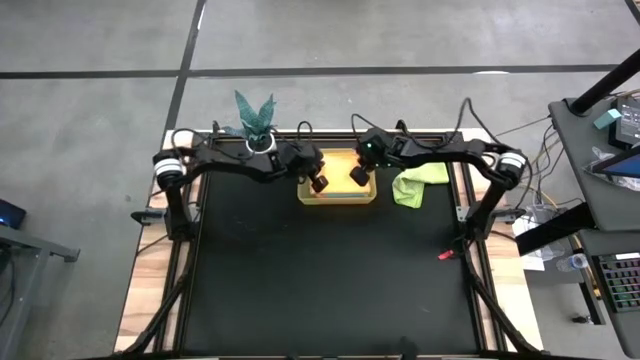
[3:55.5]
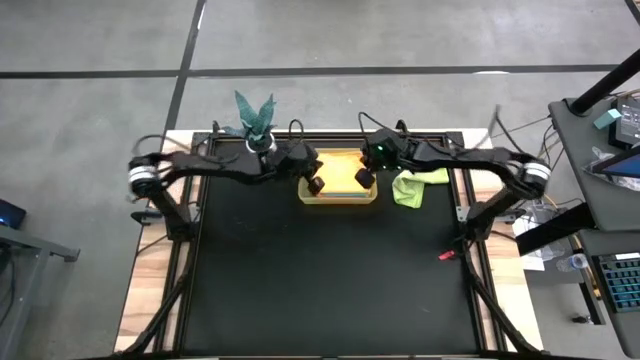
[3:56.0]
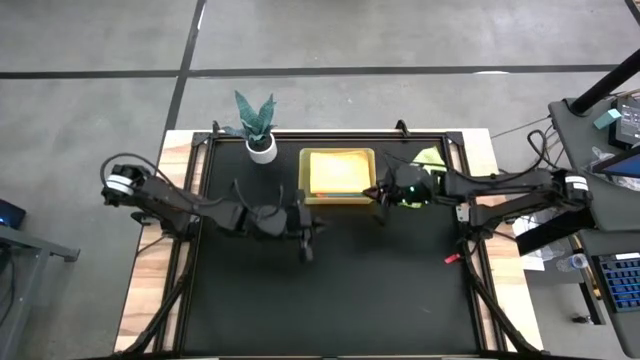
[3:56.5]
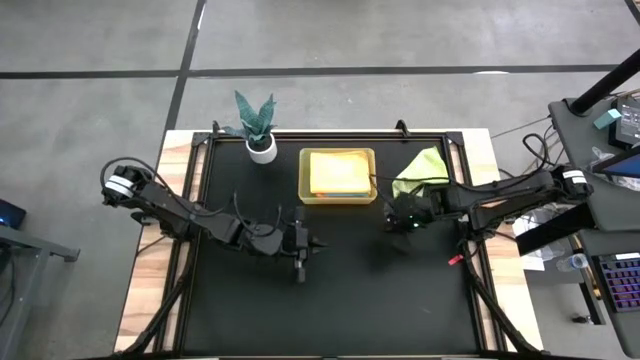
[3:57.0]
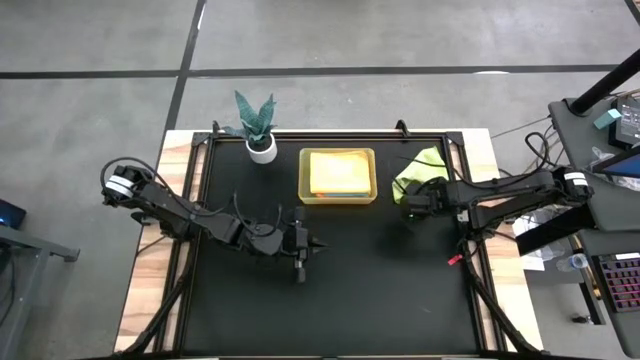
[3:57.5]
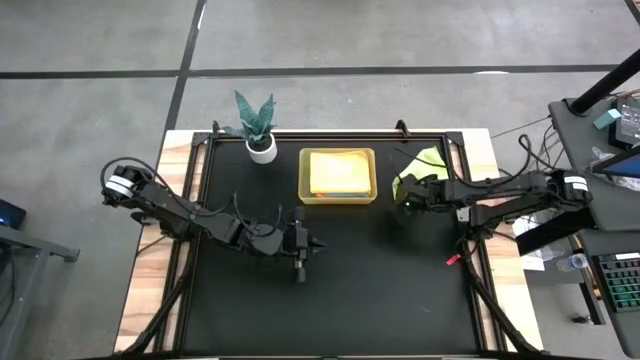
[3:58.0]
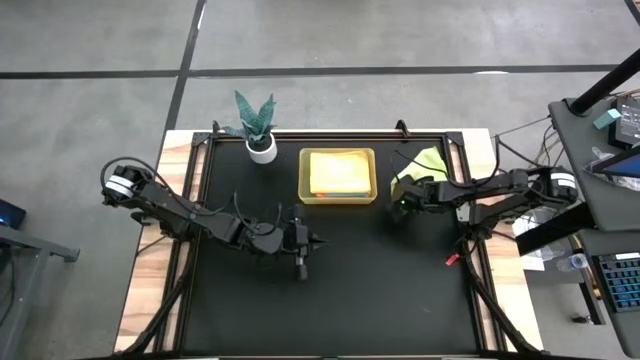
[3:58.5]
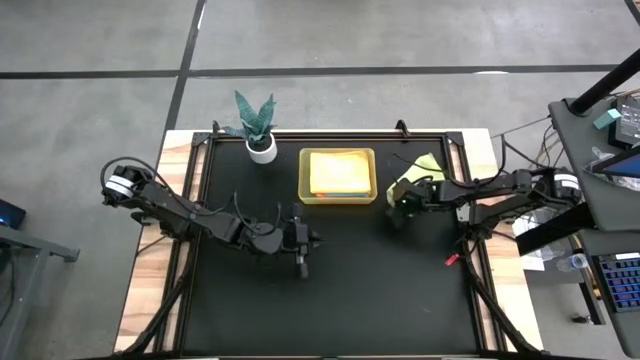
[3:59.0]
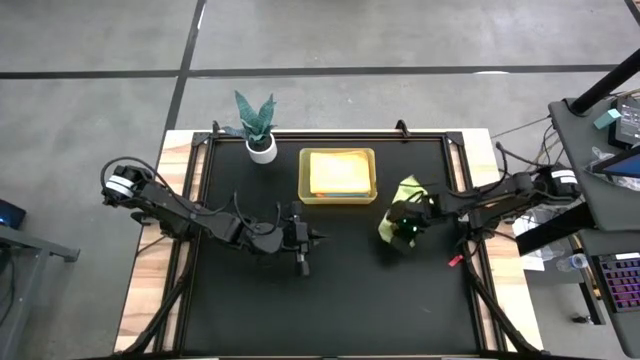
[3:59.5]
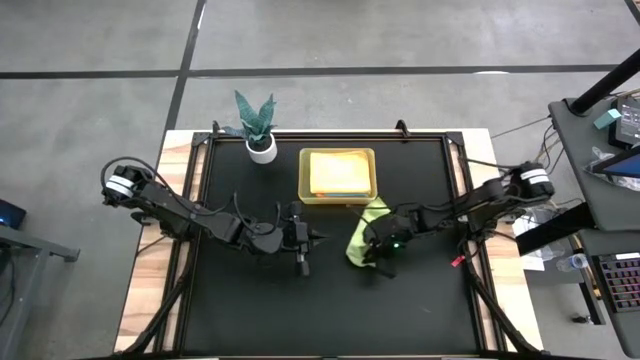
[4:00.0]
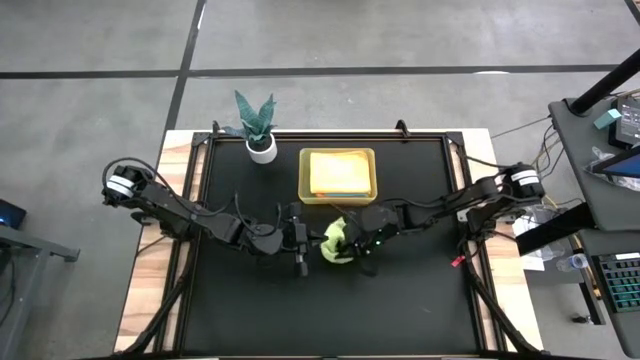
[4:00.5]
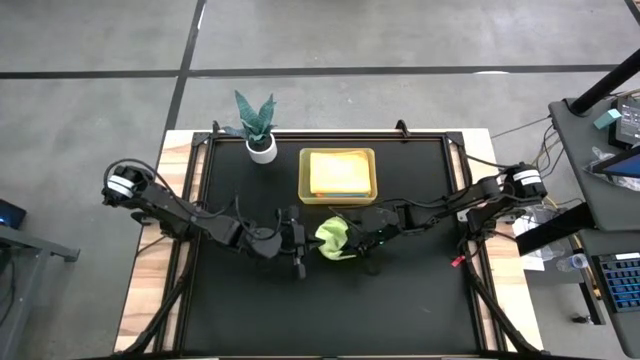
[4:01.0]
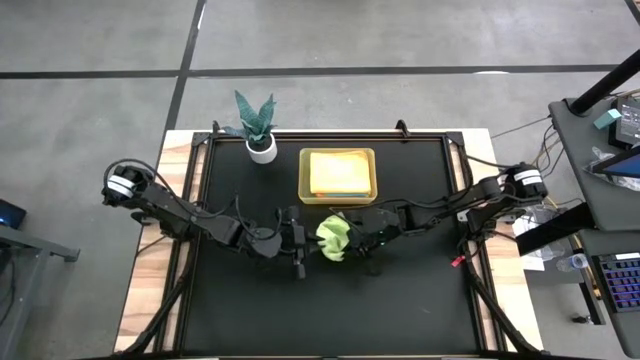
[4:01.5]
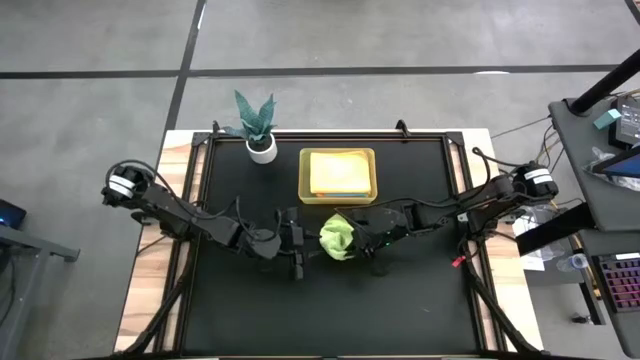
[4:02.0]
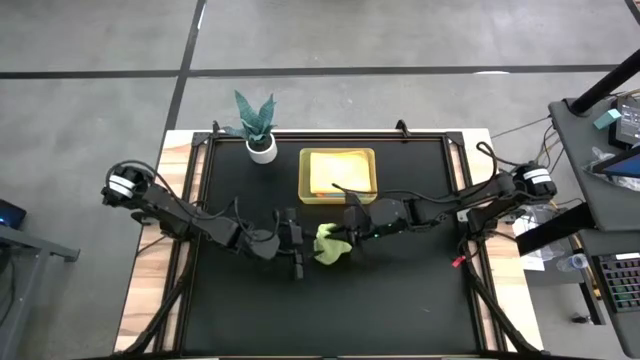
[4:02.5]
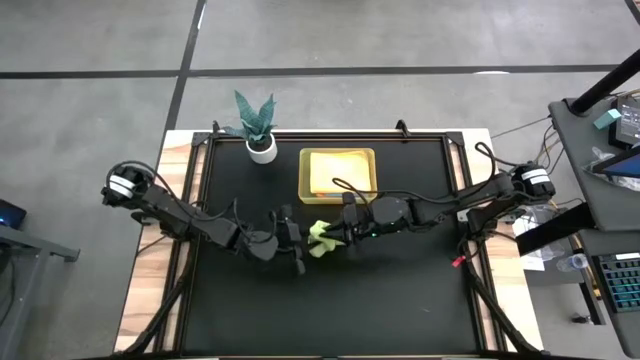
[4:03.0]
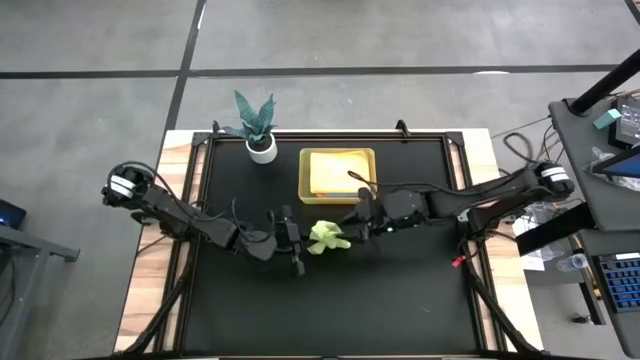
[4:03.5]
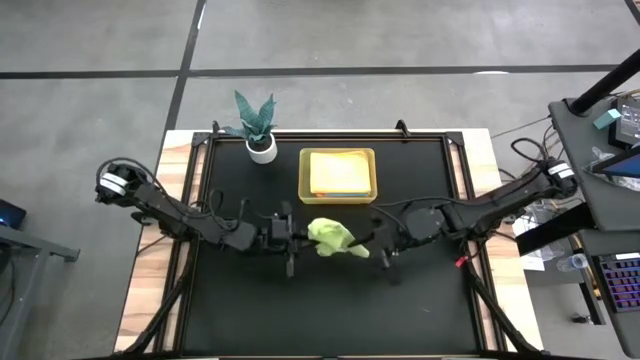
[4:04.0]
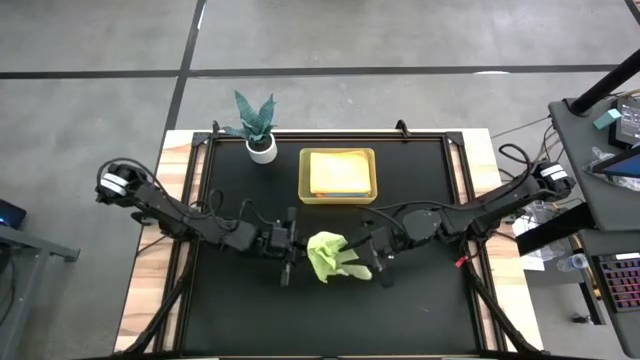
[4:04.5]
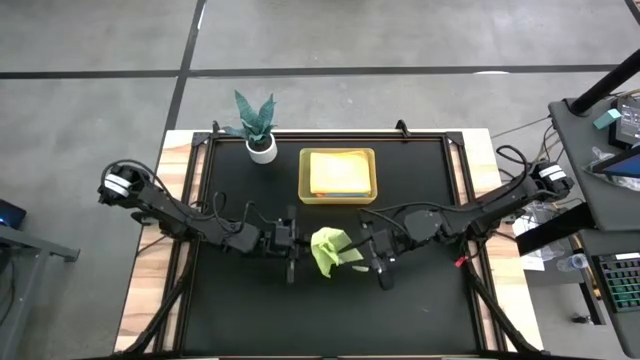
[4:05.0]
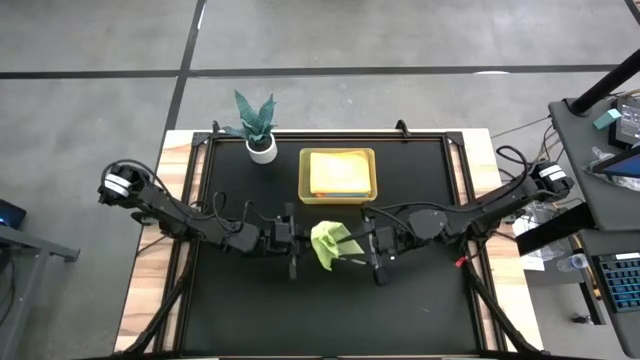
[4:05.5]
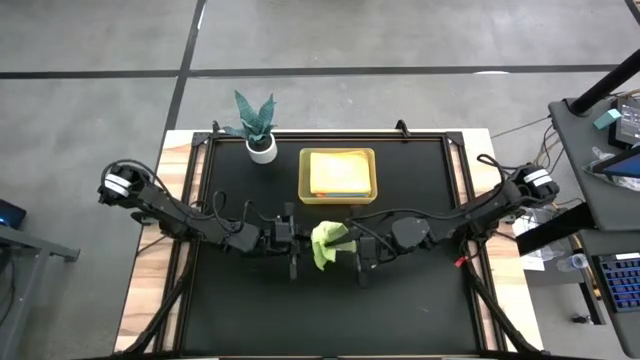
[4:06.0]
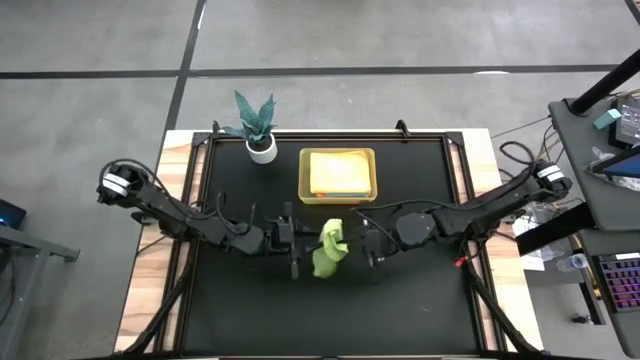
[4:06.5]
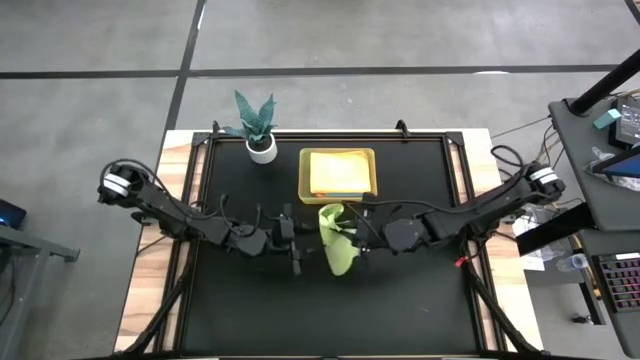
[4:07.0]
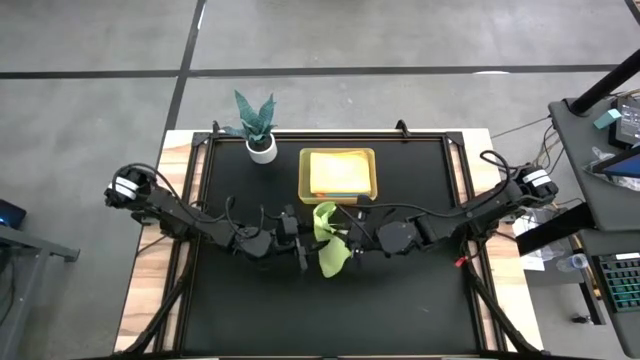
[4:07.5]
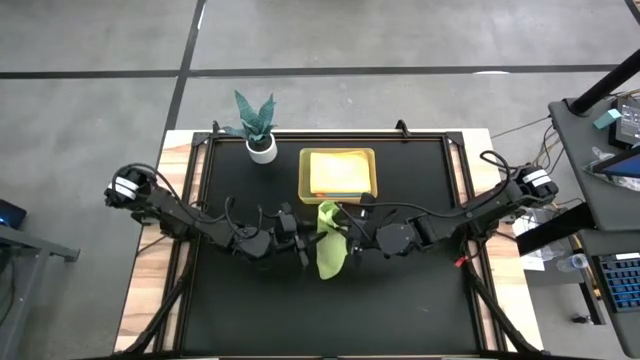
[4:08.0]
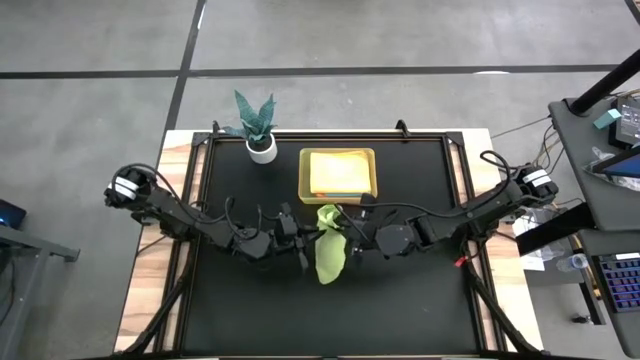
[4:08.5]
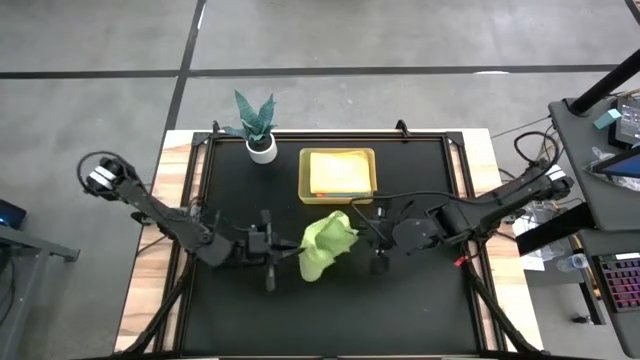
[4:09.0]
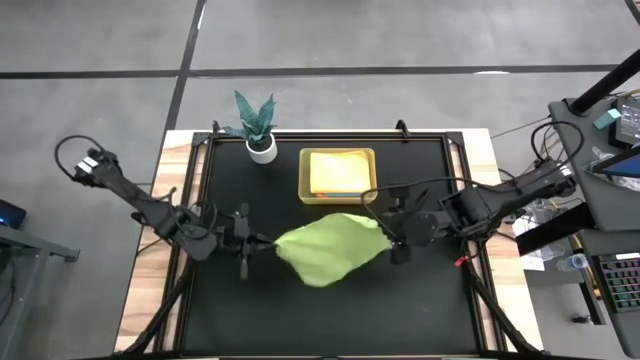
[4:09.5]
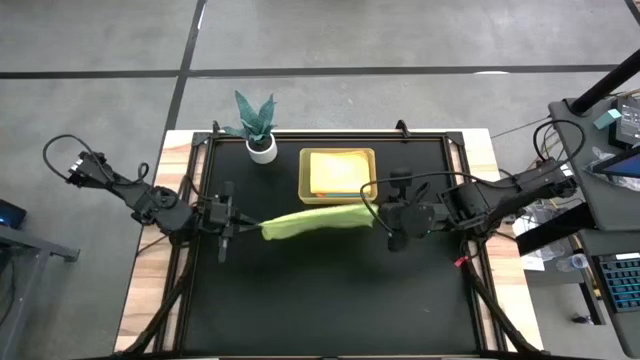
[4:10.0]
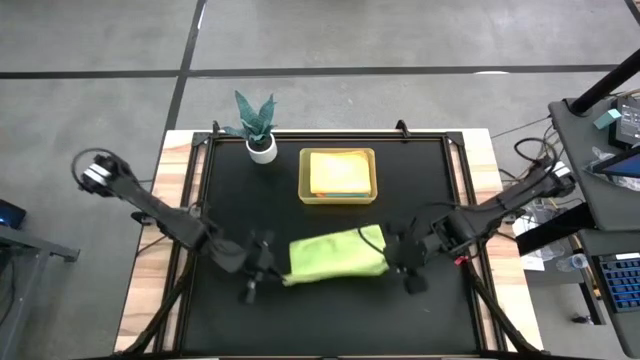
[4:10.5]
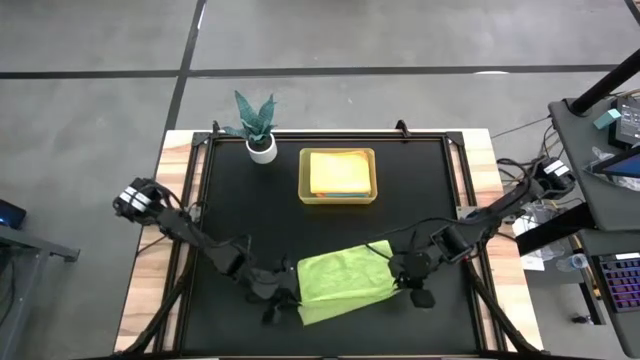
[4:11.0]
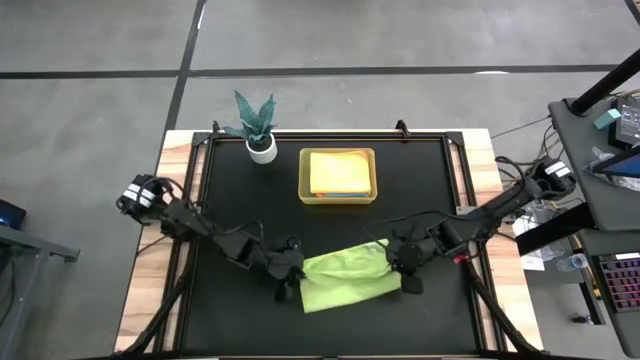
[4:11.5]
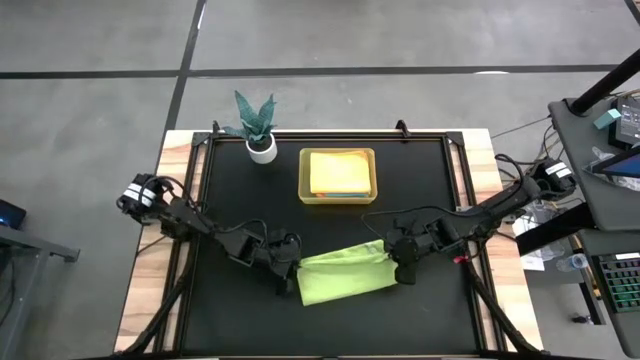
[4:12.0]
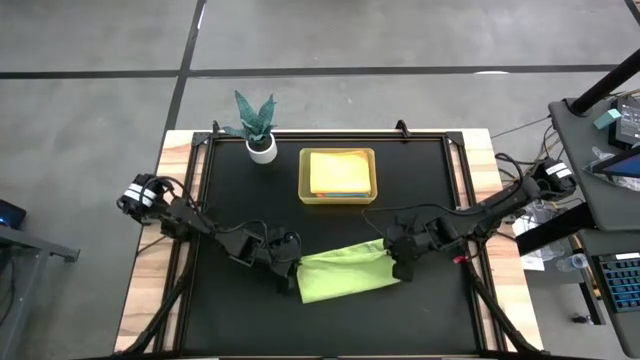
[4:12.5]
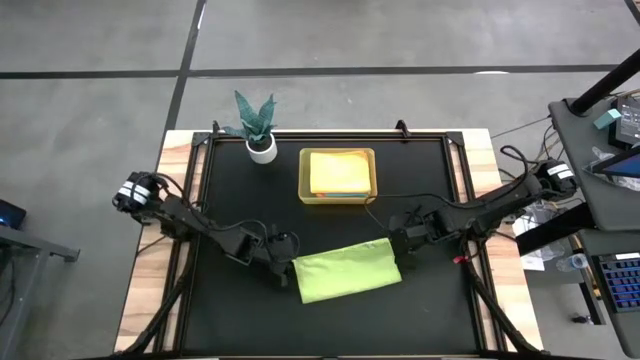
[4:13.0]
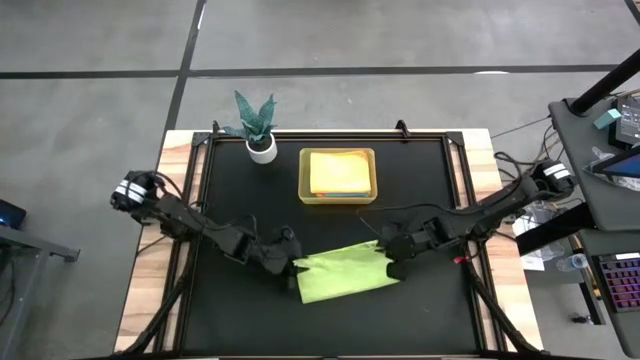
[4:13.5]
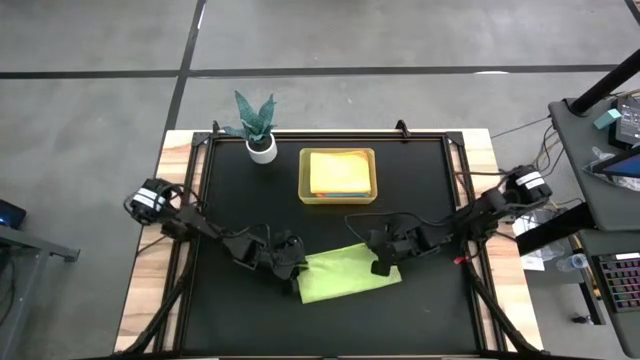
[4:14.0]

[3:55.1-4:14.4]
Task: Fold microfiber towels
Fold the green towel on the table
